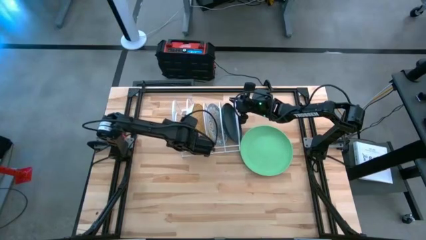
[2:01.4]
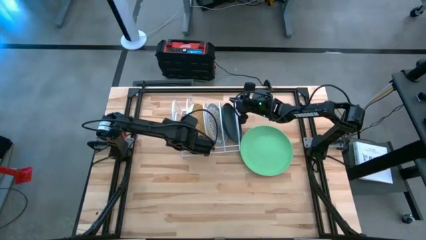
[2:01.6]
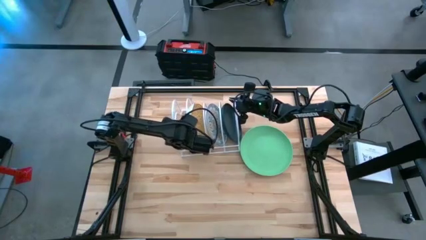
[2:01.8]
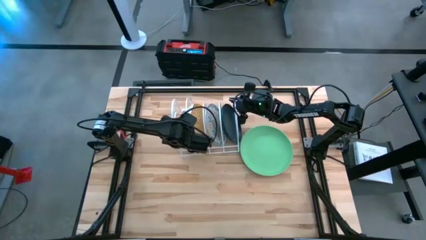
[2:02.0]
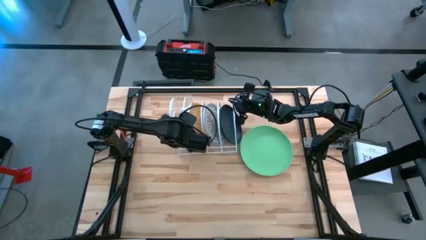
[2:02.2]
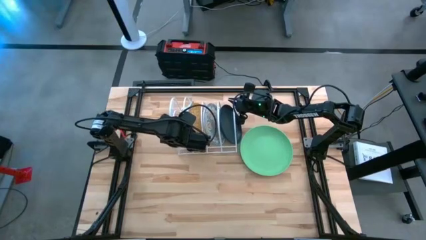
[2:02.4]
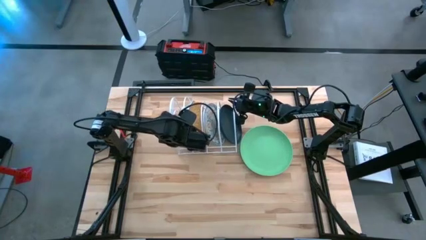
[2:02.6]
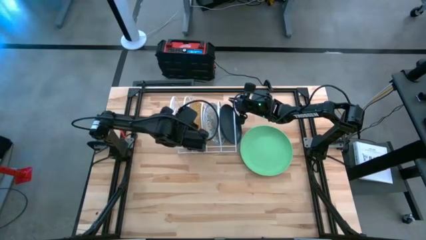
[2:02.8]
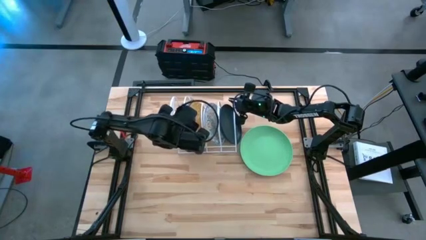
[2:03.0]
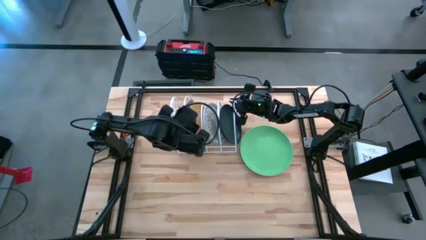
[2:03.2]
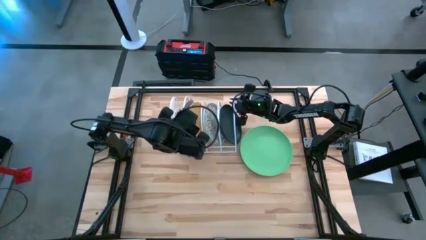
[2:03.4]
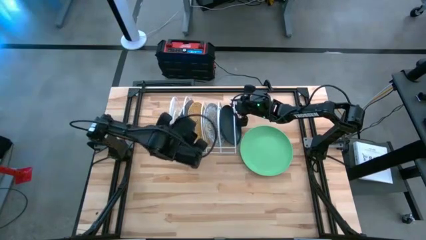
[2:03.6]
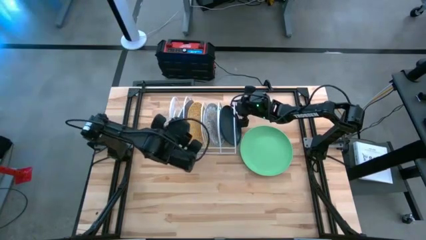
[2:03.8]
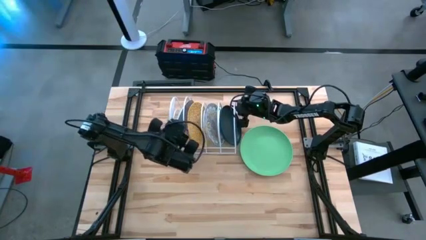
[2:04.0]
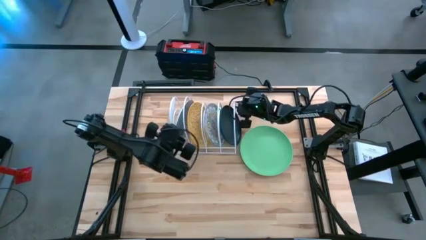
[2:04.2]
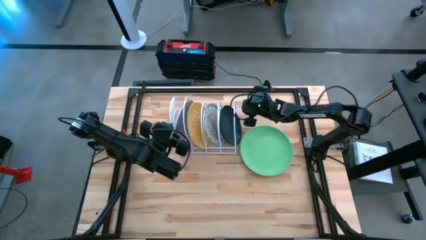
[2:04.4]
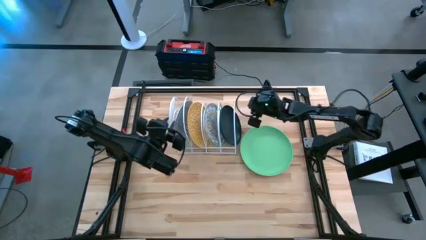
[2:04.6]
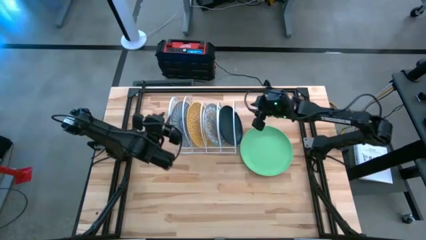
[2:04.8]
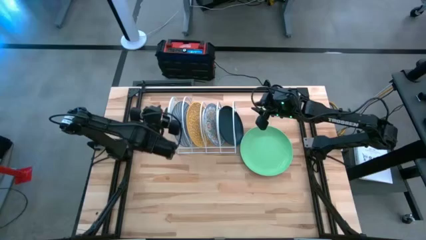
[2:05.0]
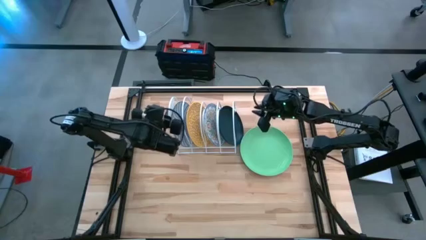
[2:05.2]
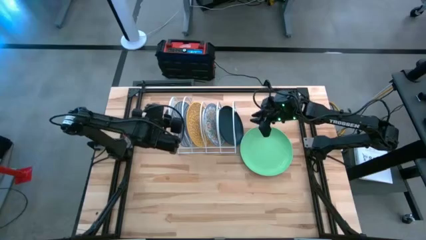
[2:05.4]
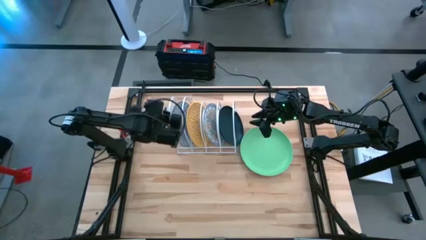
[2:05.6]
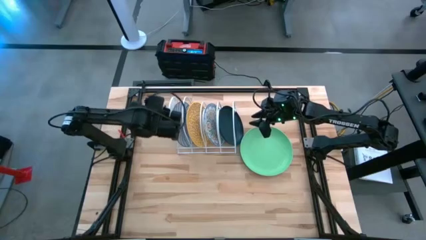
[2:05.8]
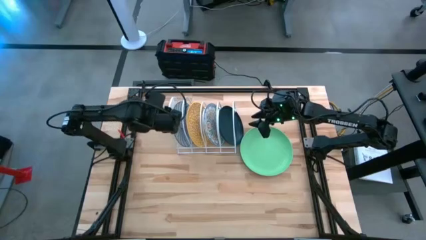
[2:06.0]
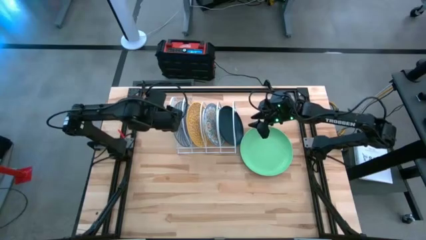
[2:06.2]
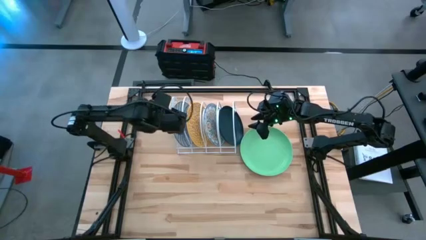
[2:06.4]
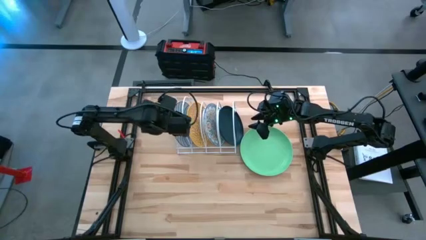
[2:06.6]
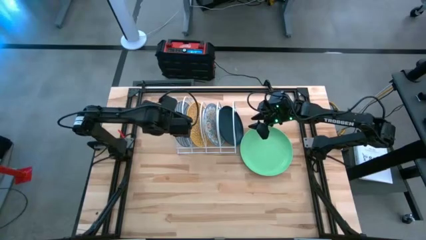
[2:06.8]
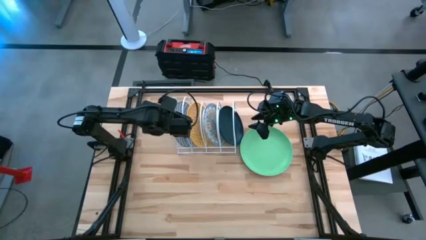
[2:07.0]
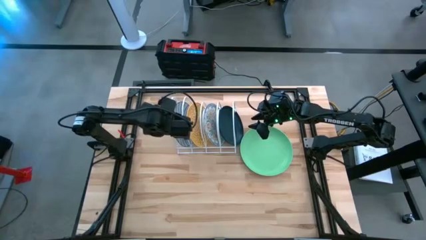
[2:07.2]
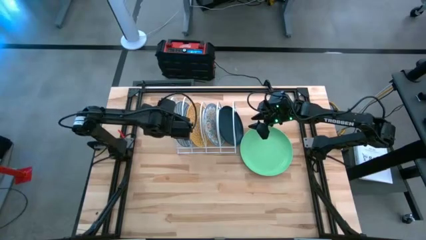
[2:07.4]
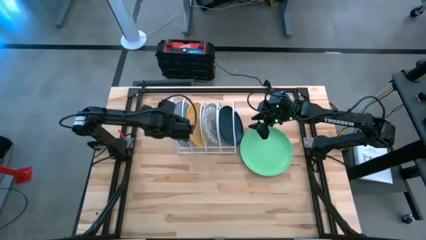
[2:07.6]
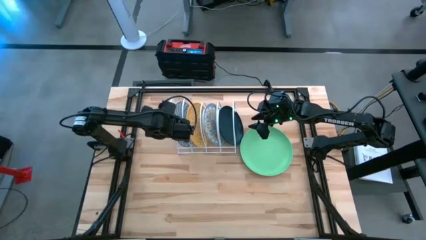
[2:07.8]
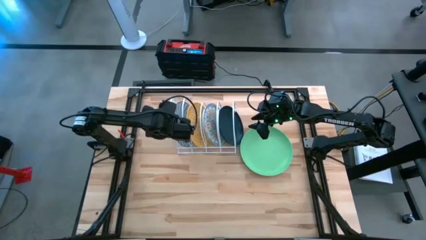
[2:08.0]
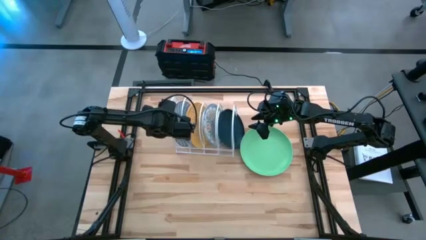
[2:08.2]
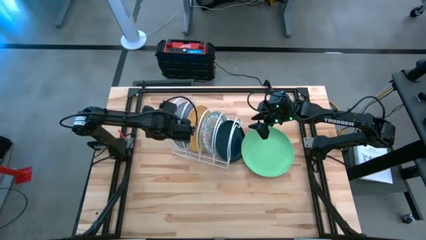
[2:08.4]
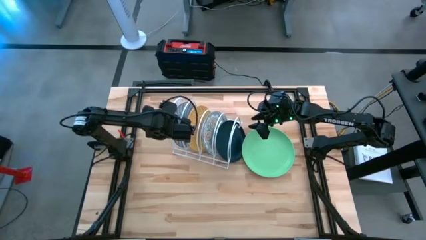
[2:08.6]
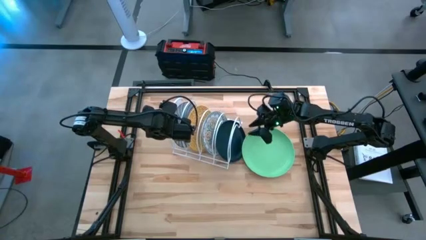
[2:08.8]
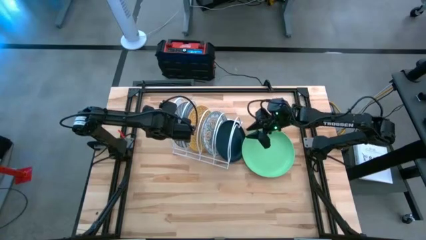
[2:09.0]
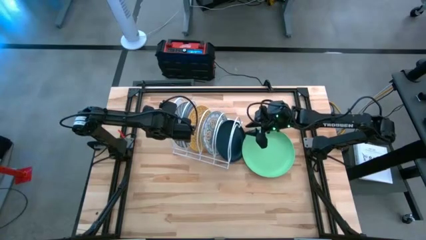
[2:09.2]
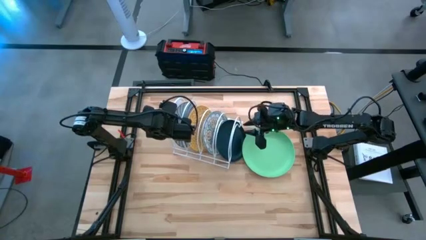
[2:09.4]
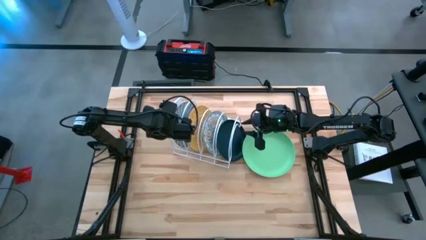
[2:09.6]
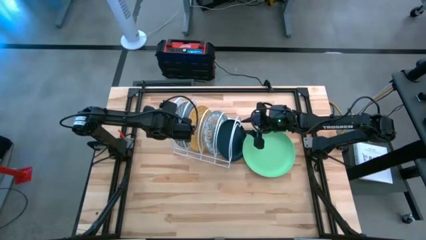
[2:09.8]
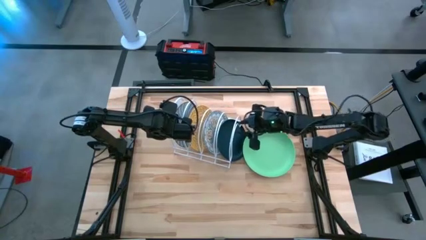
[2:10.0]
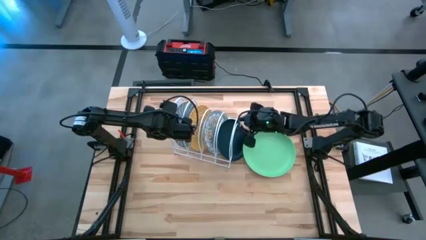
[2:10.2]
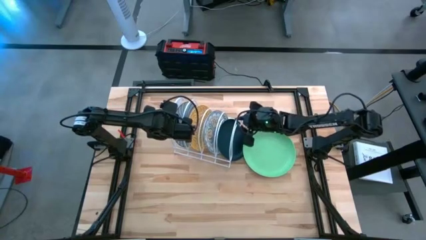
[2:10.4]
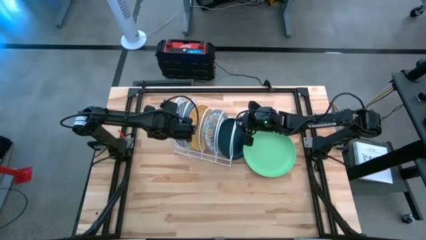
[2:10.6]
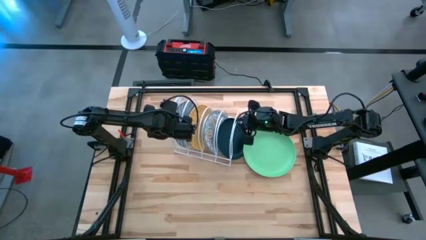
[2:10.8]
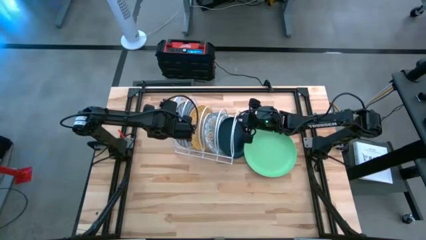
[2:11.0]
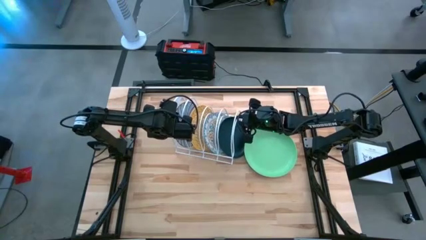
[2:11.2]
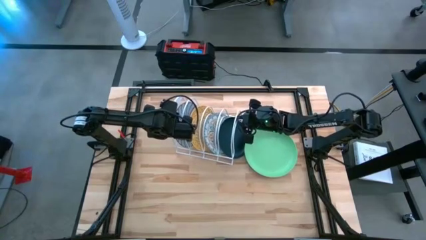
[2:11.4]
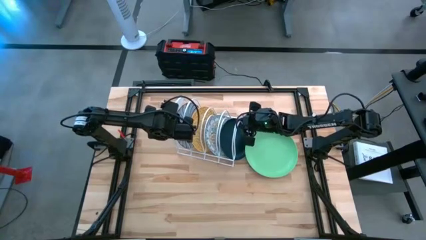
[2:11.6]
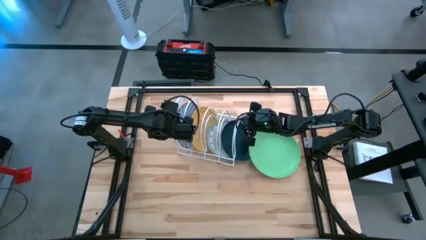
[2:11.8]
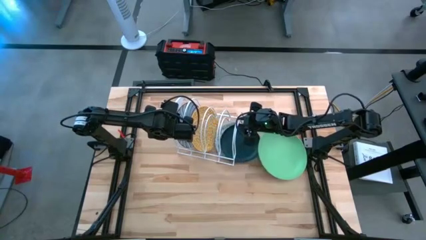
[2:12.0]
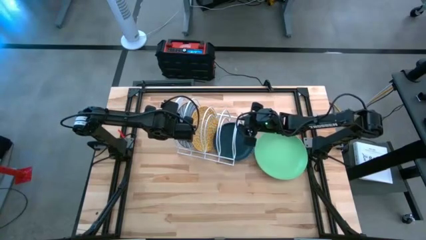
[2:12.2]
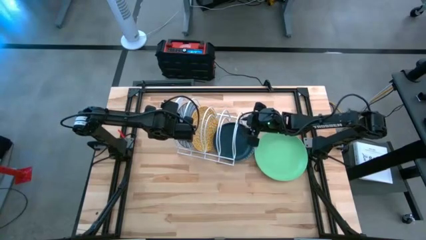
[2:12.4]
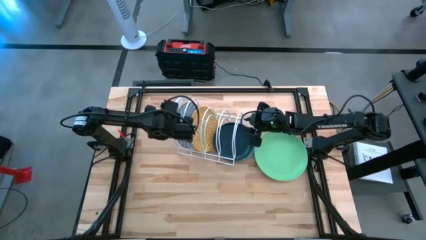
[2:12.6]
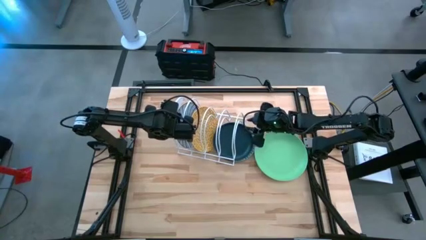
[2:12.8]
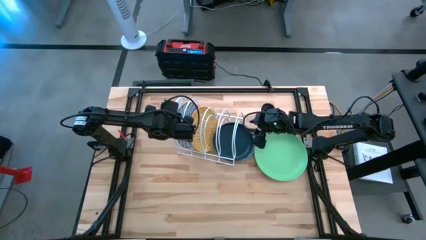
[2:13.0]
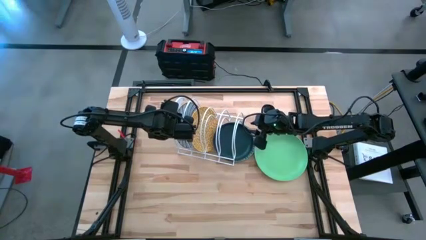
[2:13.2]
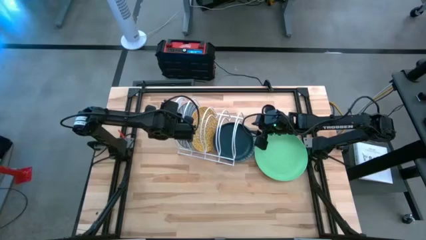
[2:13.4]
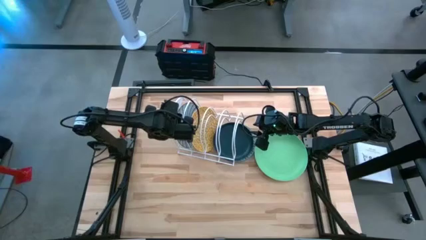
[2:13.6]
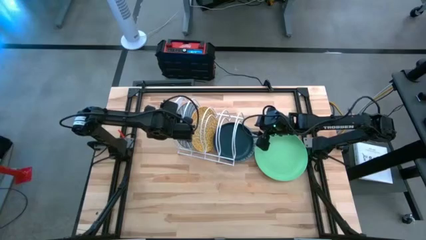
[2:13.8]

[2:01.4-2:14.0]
Task: Sort dishes
Adjust the dish rack
